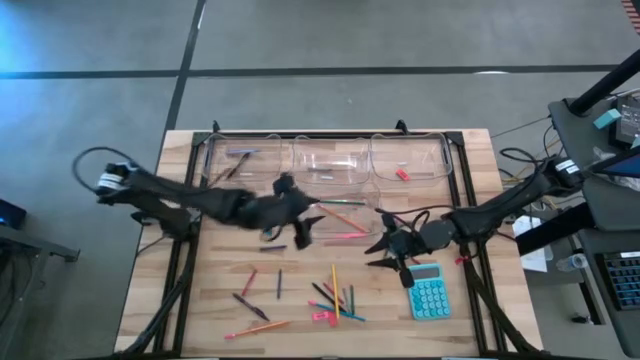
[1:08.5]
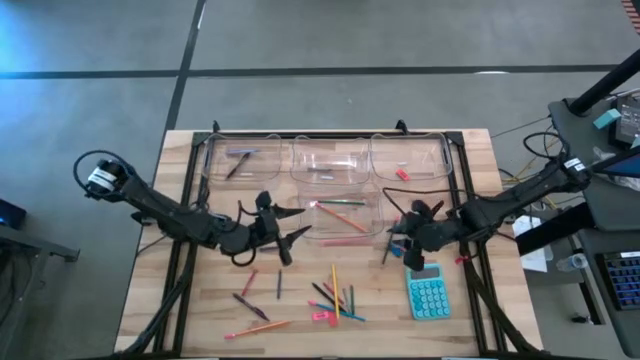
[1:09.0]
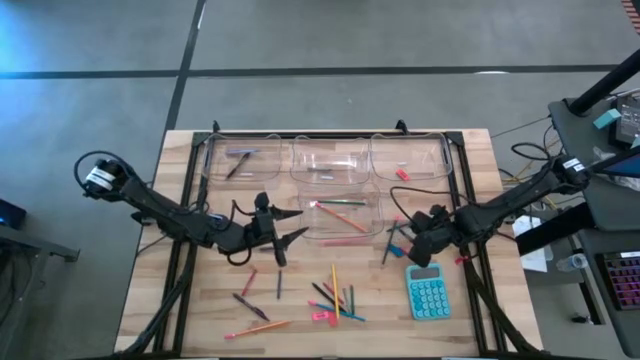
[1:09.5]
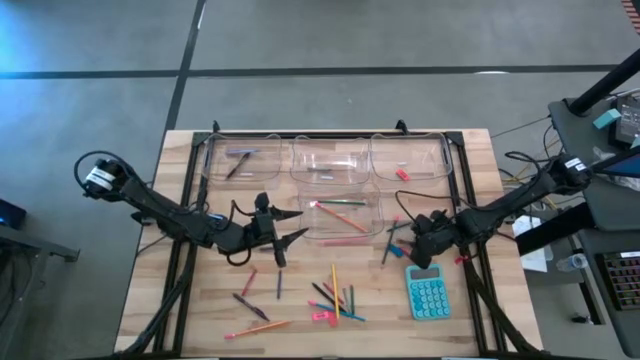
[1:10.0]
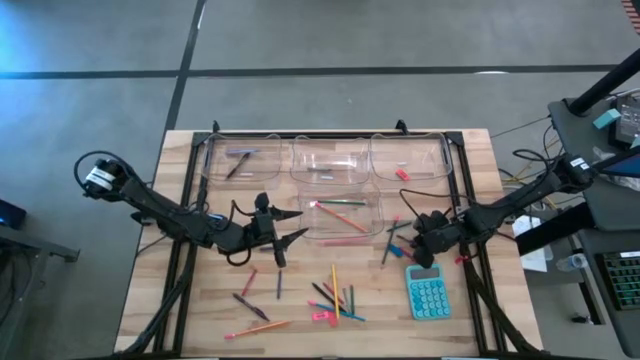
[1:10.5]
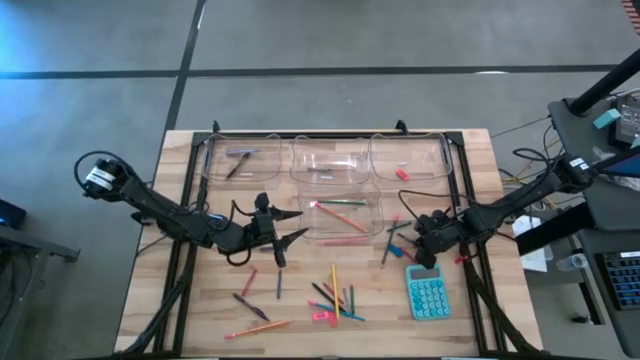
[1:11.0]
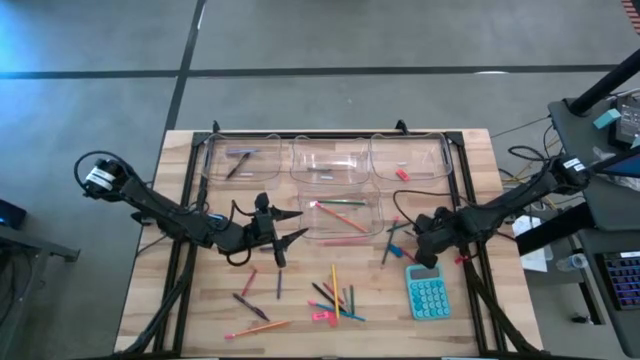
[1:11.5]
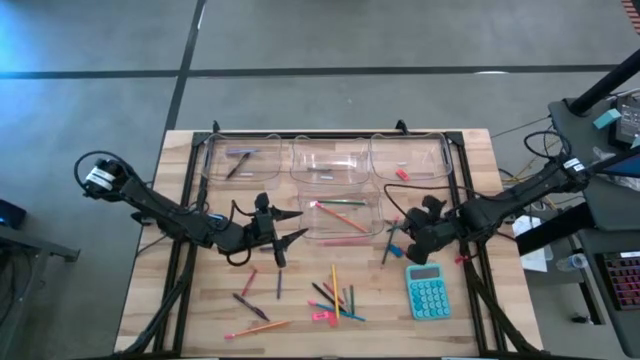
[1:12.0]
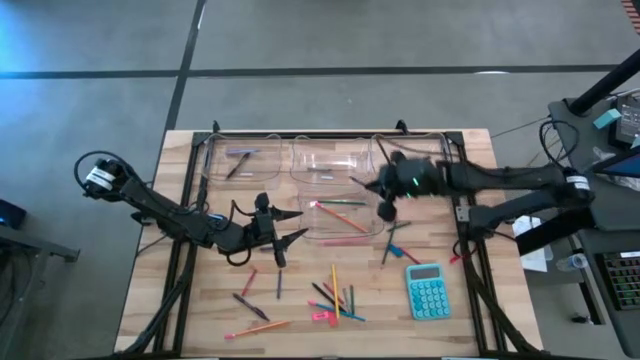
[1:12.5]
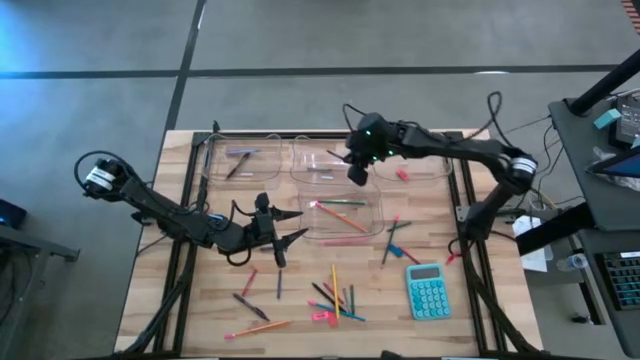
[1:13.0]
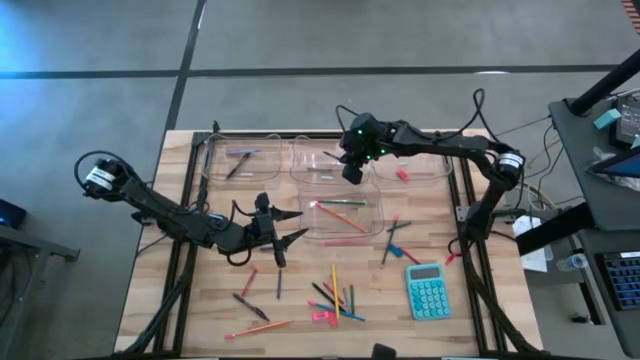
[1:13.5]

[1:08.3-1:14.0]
Task: Sort crayons/erasers/pens/pencils in bins
Put the top right blue crayon into the top middle transparent bin

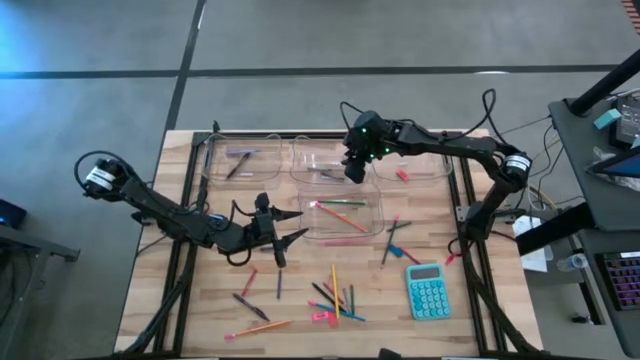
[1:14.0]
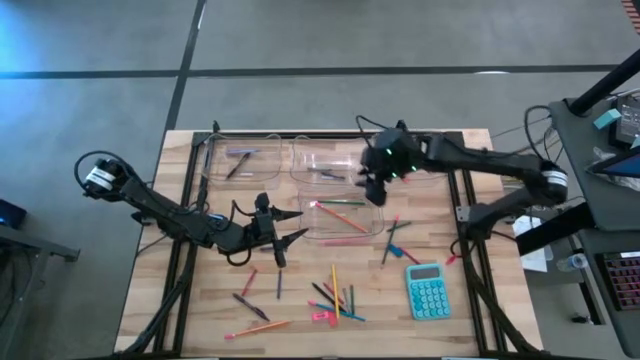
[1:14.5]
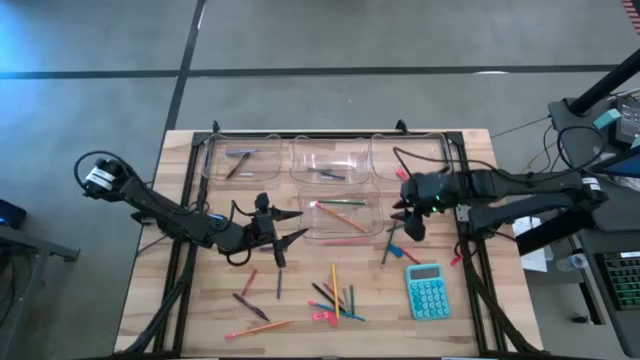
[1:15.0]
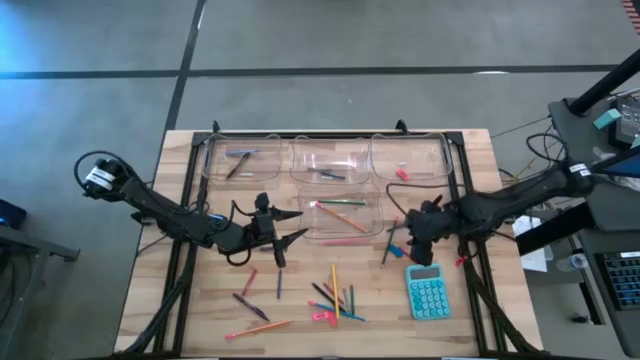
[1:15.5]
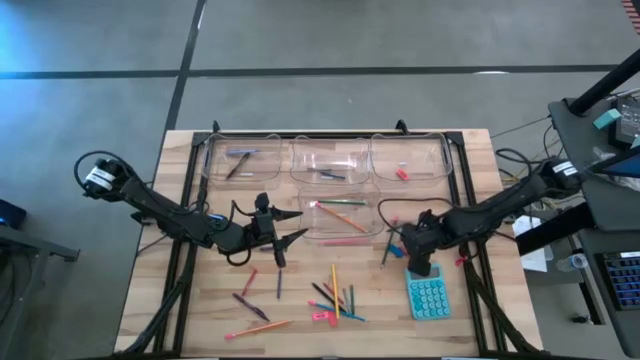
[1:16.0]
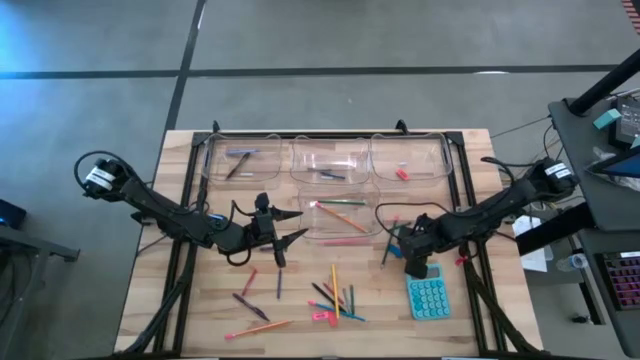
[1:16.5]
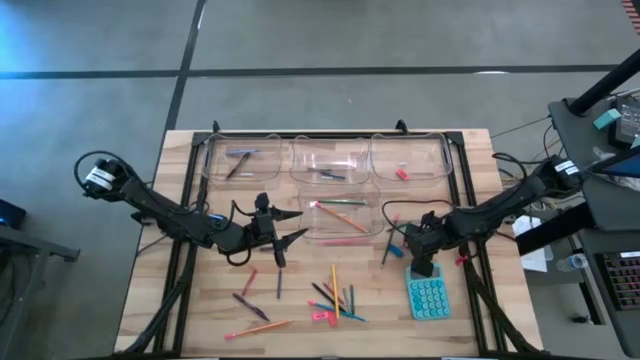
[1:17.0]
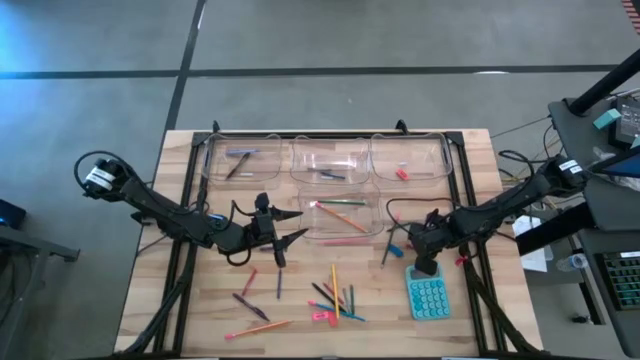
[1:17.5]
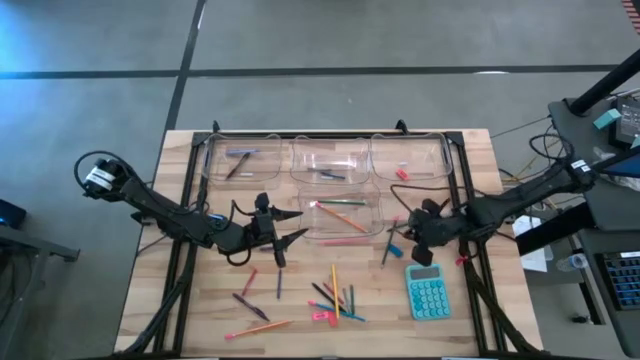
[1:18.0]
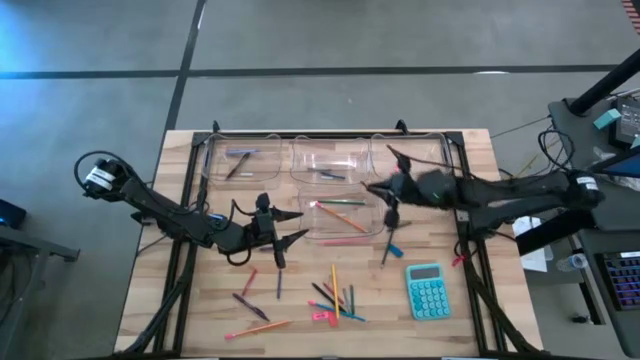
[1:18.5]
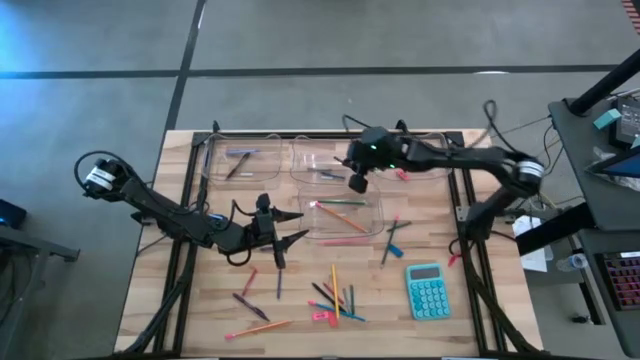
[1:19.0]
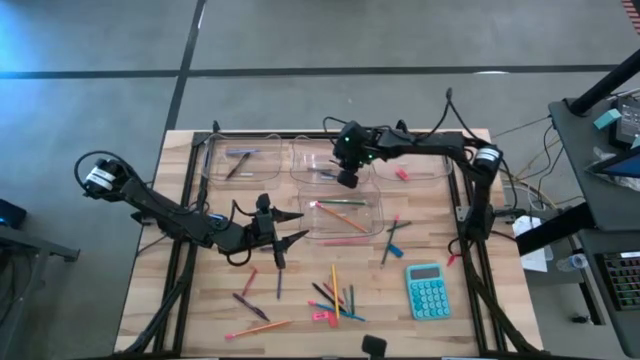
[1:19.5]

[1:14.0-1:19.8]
Put the right red crayon into the top middle transparent bin

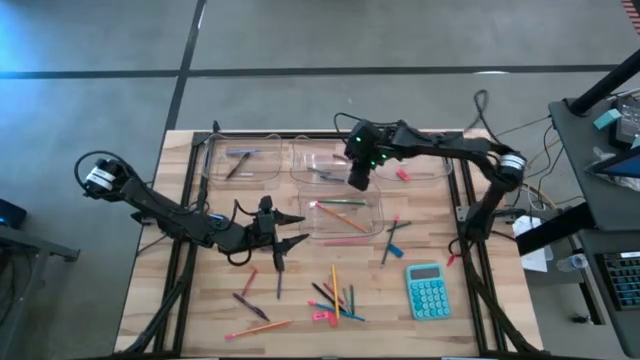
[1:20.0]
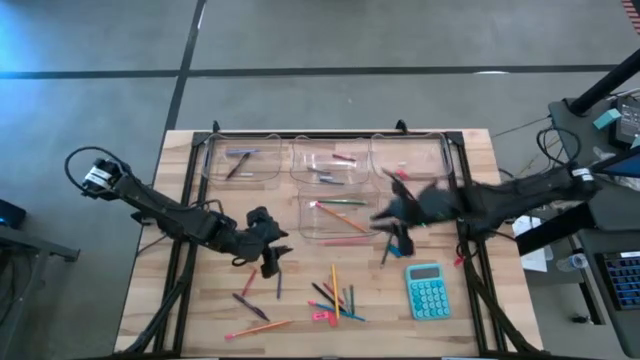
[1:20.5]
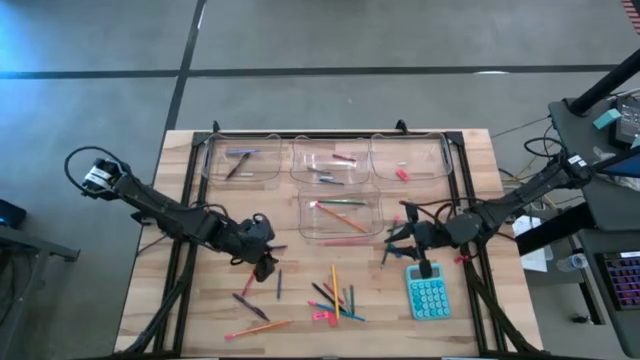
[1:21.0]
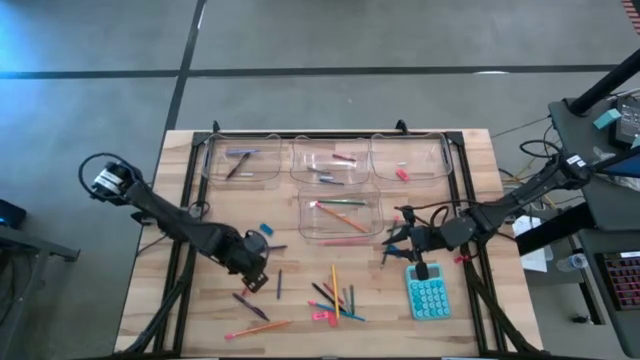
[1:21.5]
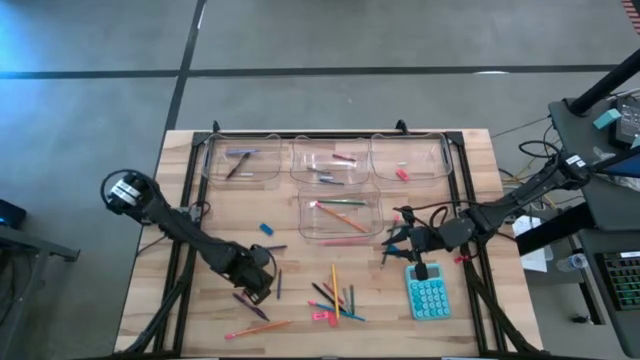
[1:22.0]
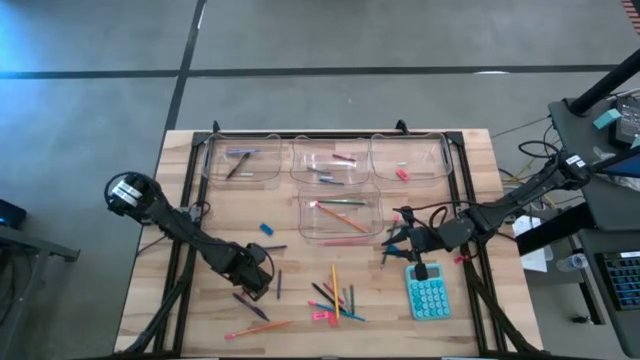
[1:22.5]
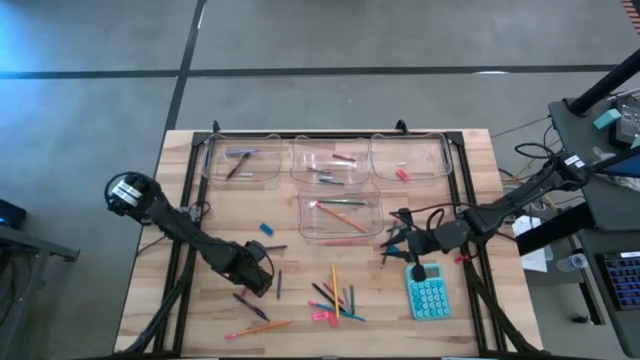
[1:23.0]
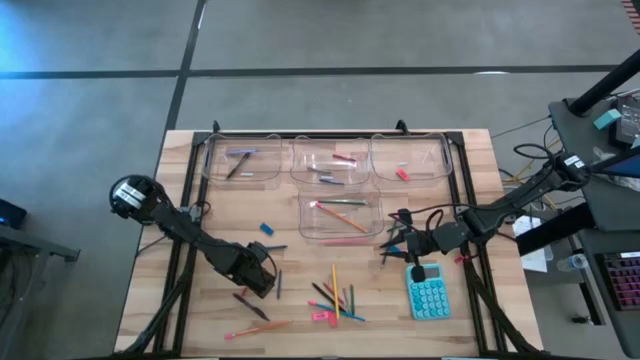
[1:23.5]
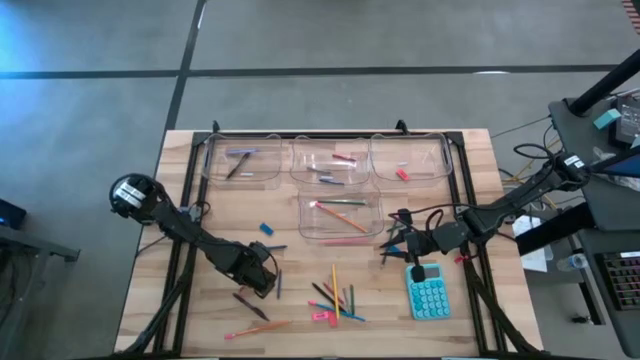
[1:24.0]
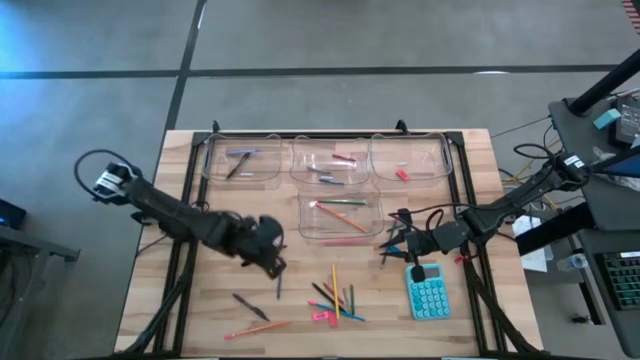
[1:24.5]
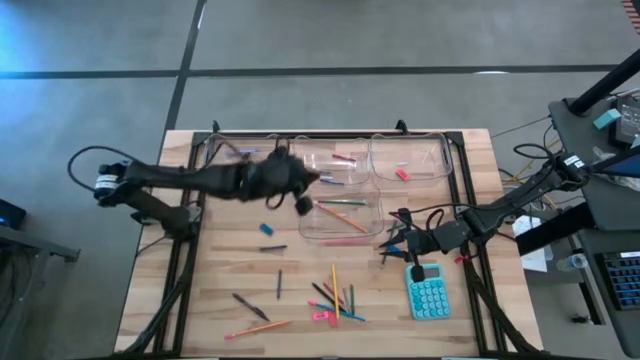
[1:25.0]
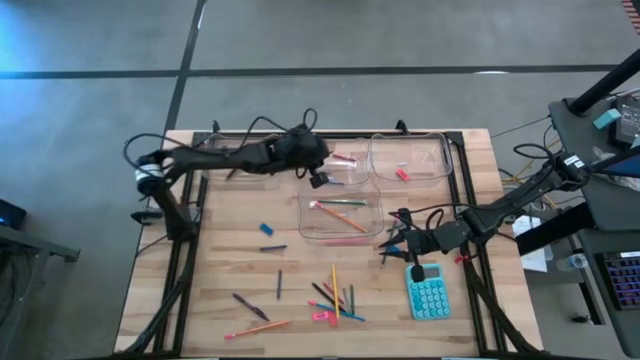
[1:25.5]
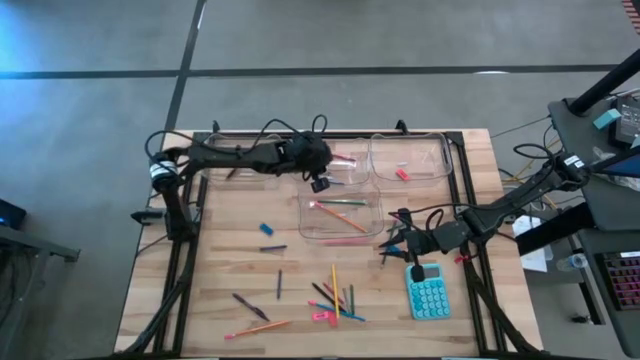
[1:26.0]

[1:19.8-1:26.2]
Put the left red crayon into the top middle transparent bin

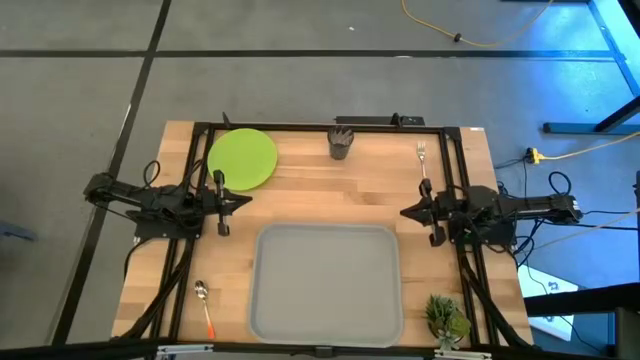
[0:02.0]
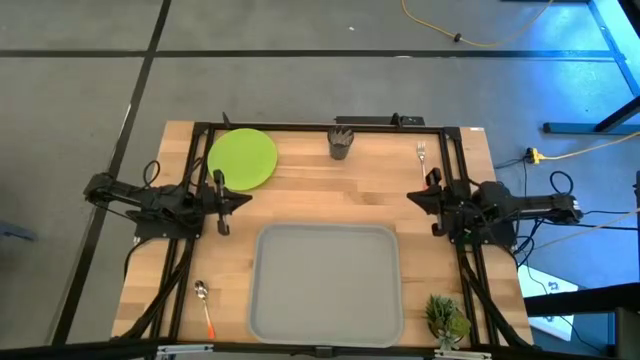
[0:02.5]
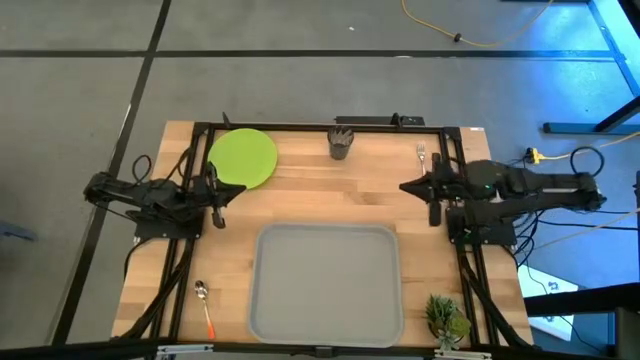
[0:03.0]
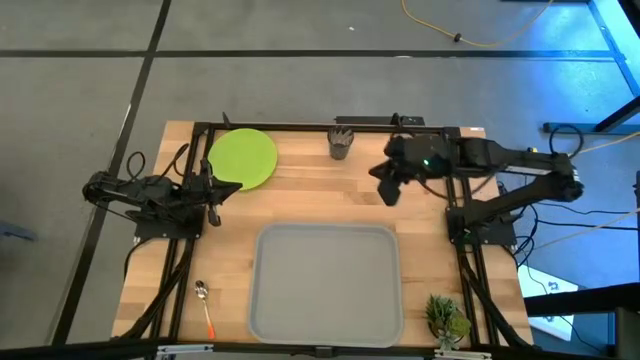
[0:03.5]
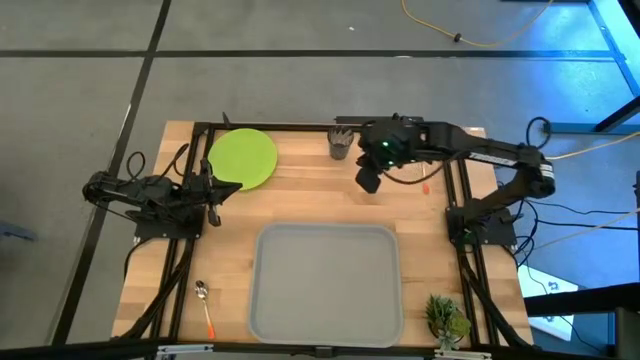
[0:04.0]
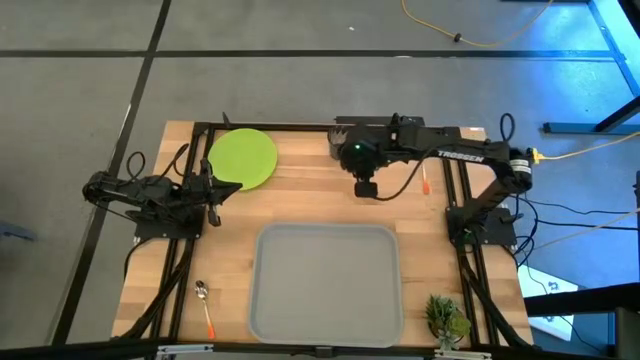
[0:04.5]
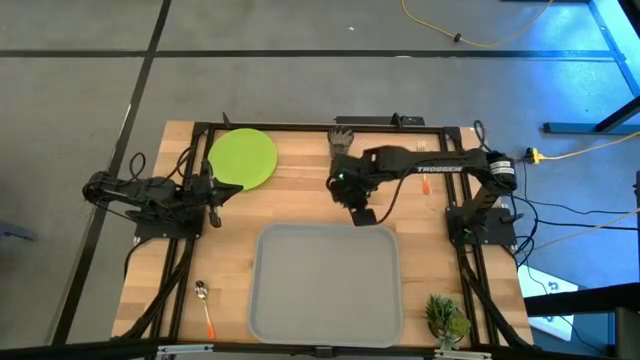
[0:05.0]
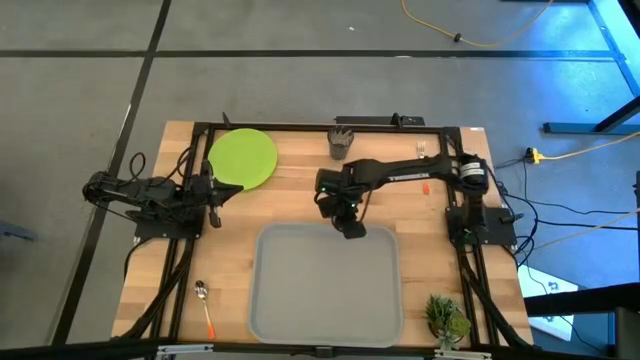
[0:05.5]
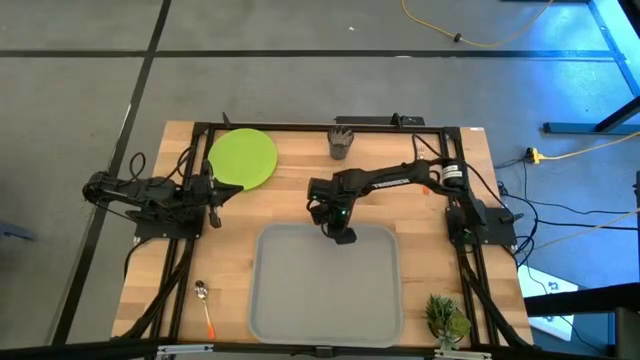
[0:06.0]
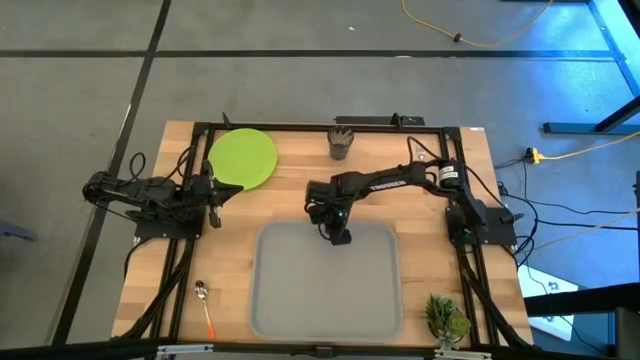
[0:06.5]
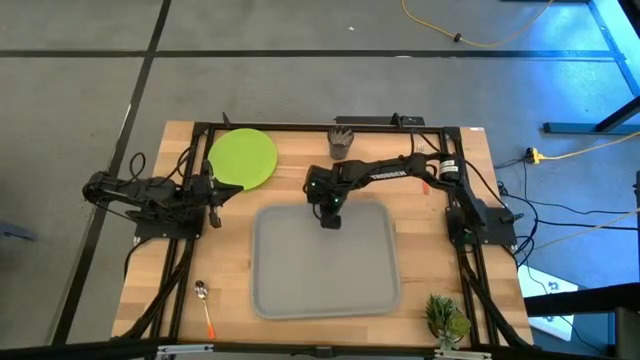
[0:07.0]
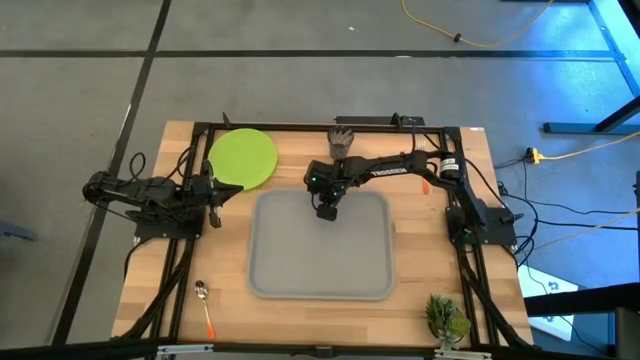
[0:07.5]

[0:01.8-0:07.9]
Task: Pick and place plate/cup/fork/spoon on tray
Move the gray tray to the center of the table
